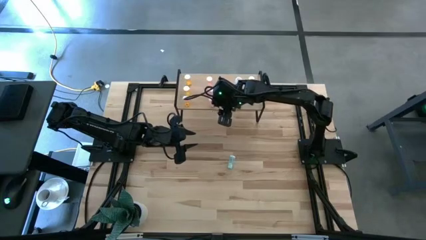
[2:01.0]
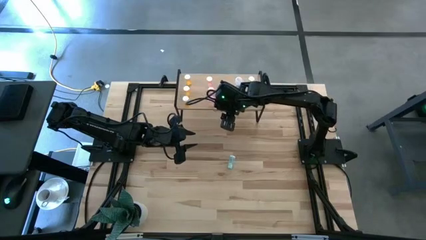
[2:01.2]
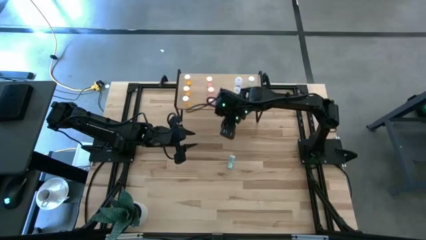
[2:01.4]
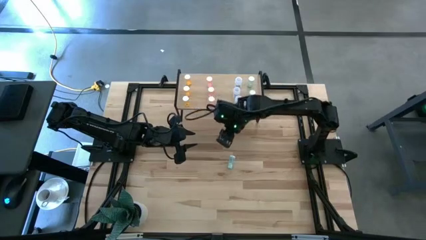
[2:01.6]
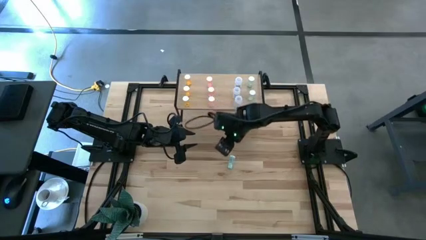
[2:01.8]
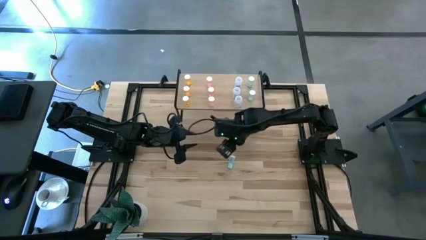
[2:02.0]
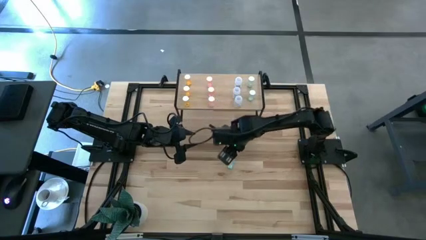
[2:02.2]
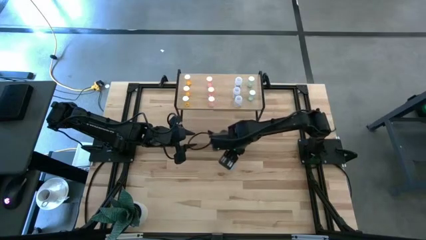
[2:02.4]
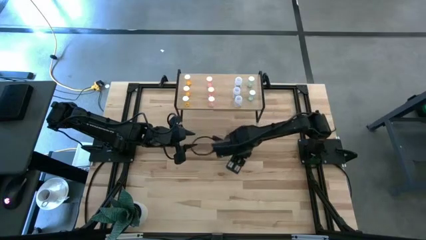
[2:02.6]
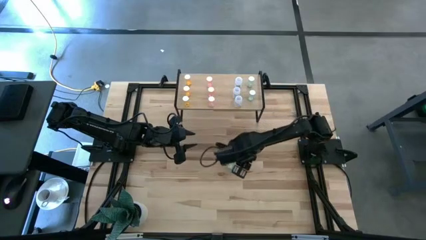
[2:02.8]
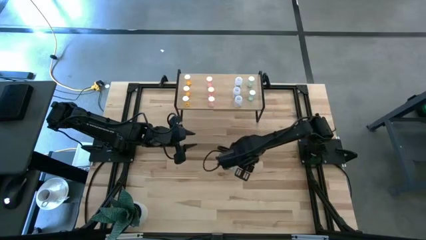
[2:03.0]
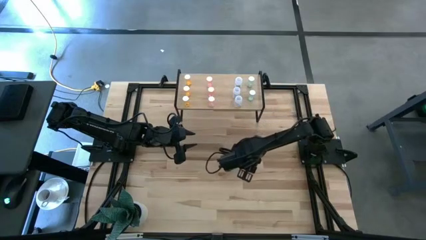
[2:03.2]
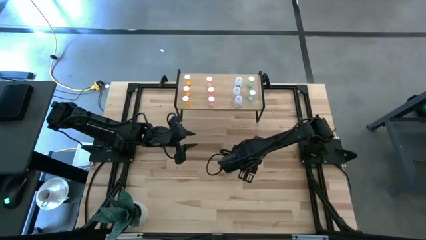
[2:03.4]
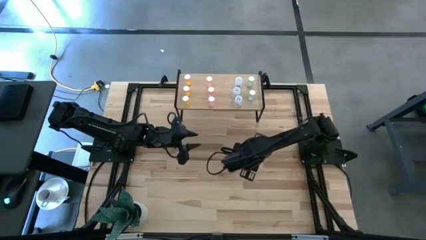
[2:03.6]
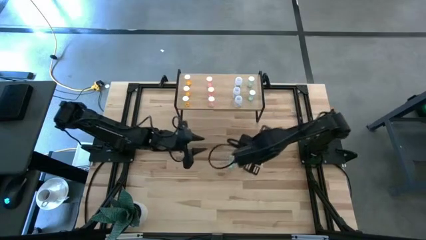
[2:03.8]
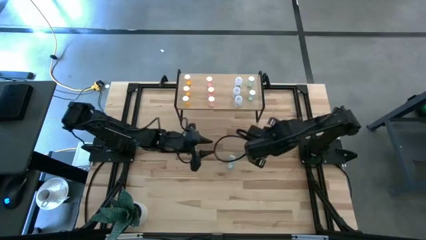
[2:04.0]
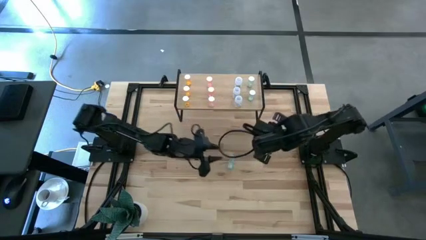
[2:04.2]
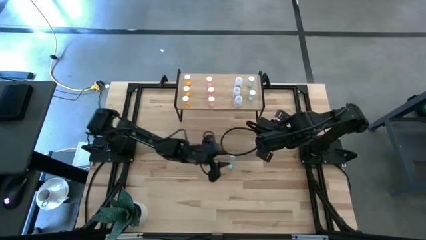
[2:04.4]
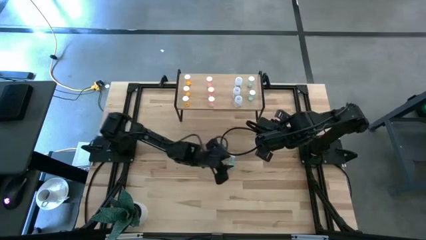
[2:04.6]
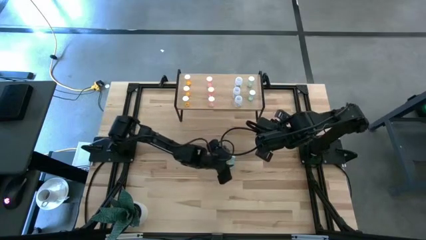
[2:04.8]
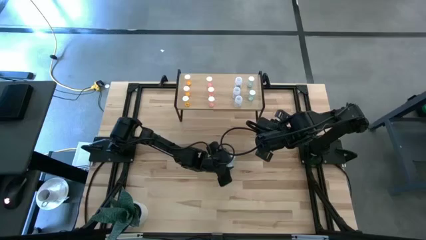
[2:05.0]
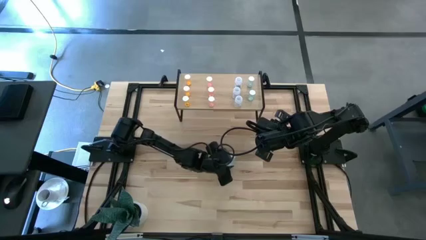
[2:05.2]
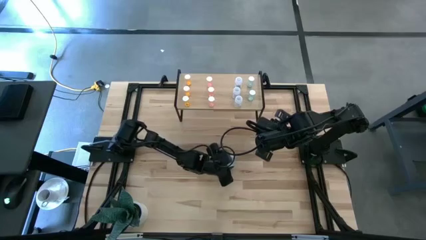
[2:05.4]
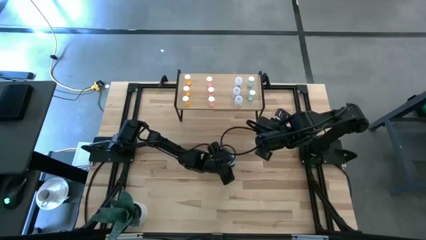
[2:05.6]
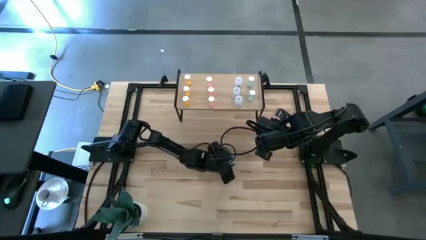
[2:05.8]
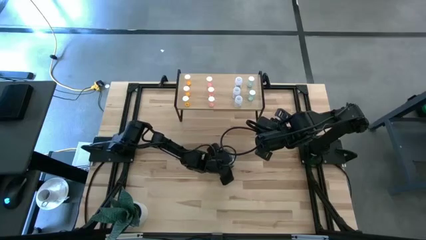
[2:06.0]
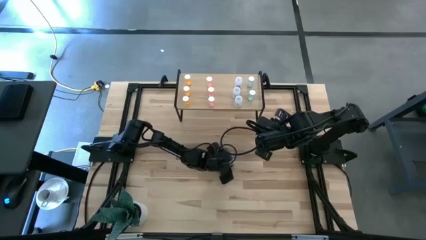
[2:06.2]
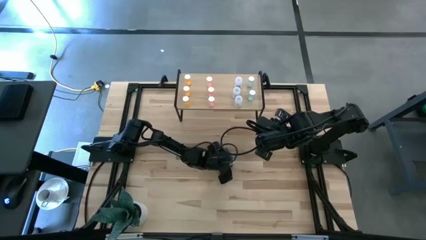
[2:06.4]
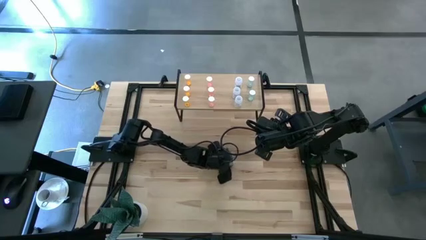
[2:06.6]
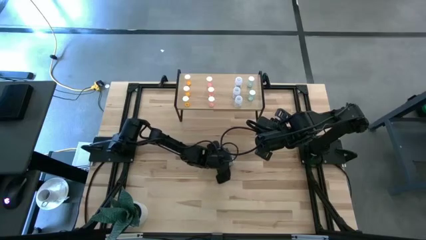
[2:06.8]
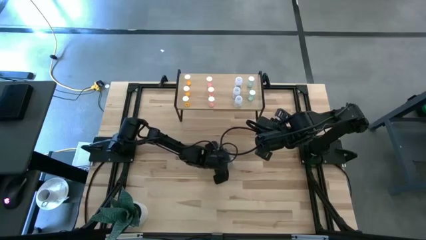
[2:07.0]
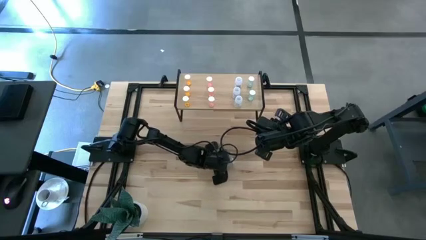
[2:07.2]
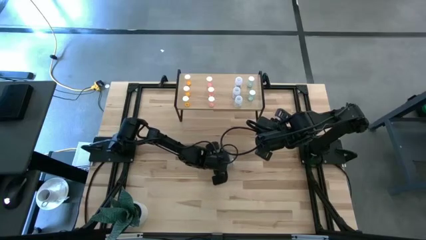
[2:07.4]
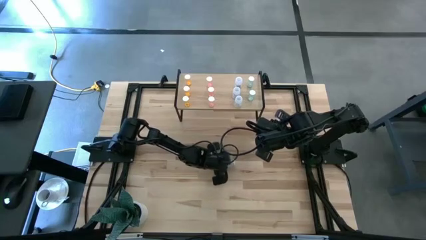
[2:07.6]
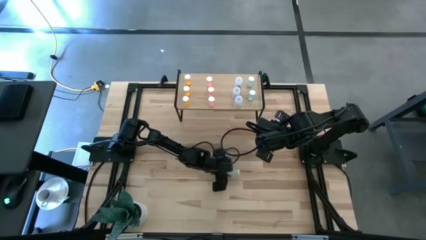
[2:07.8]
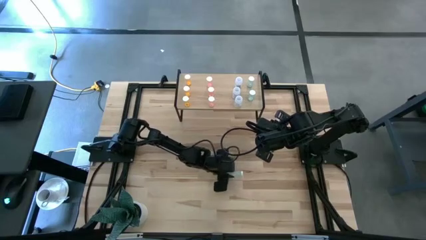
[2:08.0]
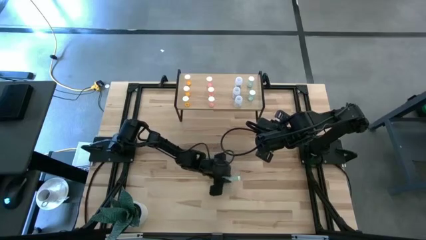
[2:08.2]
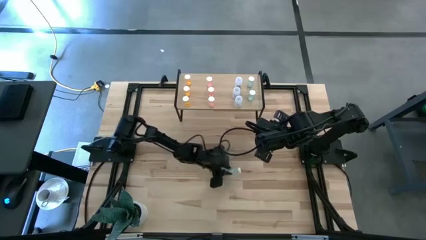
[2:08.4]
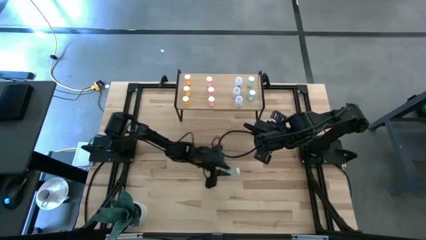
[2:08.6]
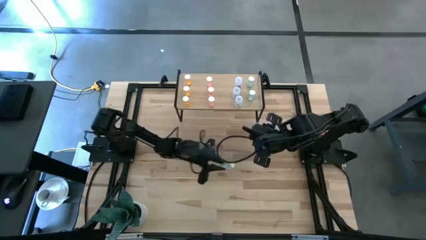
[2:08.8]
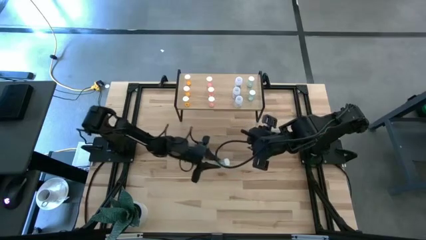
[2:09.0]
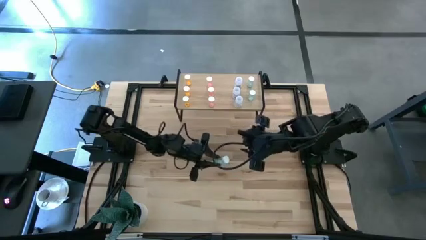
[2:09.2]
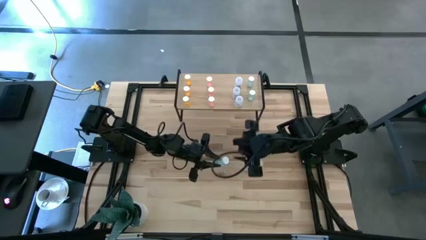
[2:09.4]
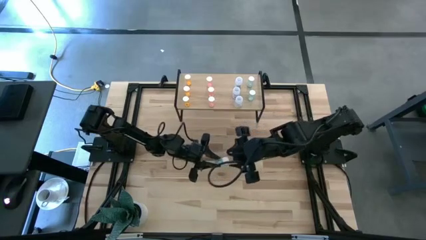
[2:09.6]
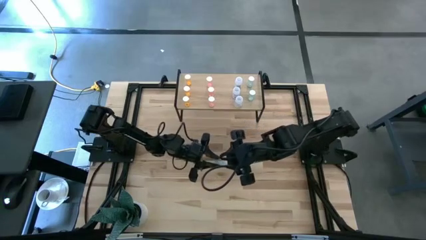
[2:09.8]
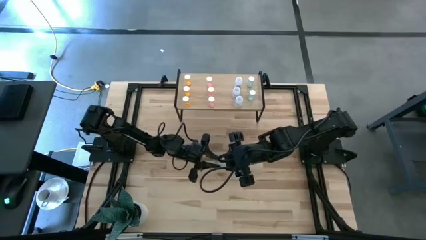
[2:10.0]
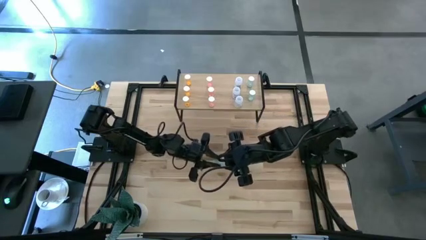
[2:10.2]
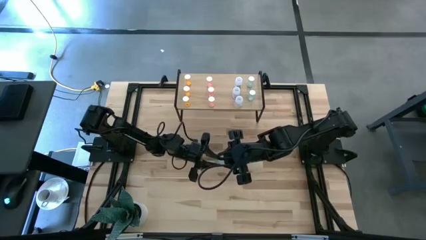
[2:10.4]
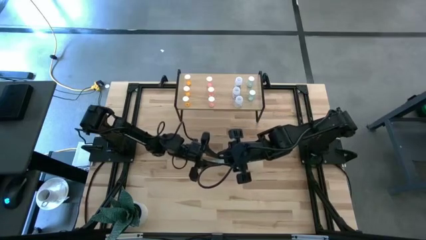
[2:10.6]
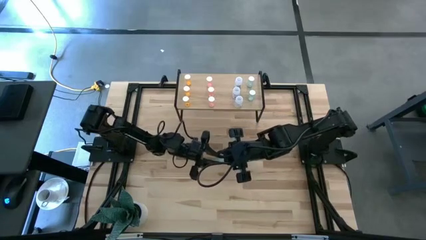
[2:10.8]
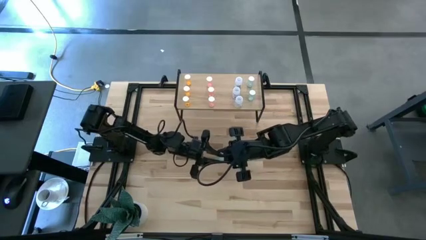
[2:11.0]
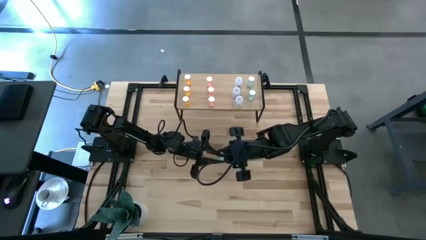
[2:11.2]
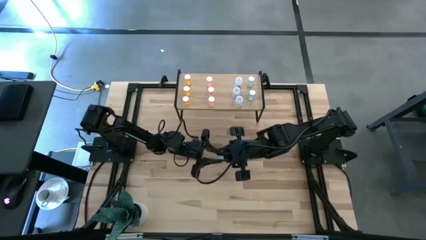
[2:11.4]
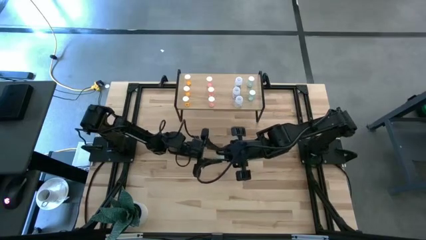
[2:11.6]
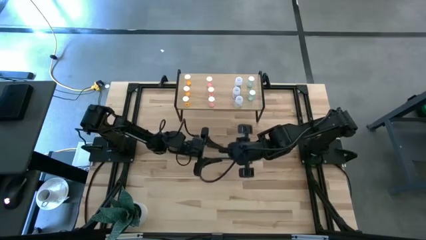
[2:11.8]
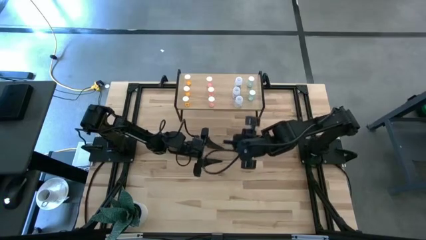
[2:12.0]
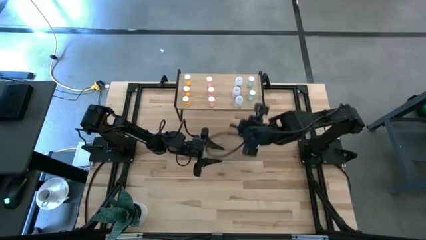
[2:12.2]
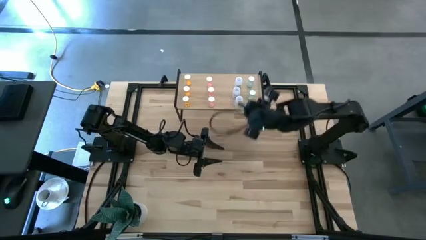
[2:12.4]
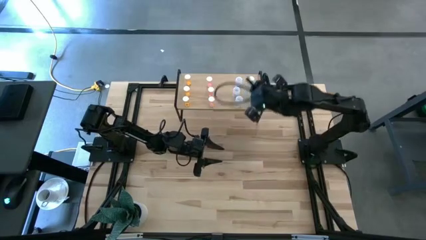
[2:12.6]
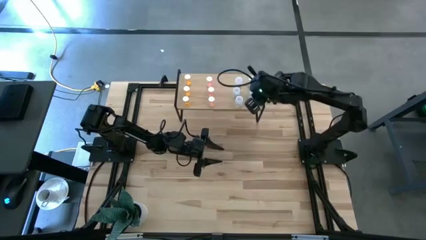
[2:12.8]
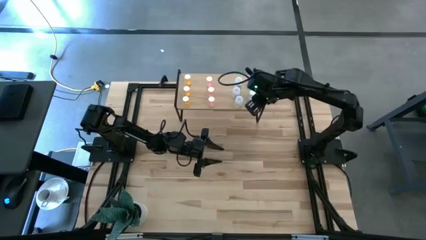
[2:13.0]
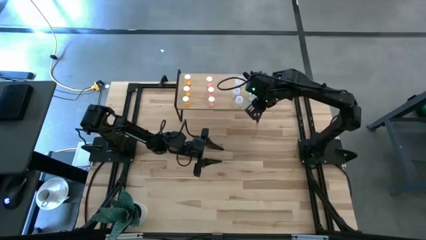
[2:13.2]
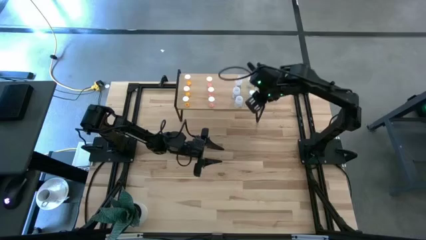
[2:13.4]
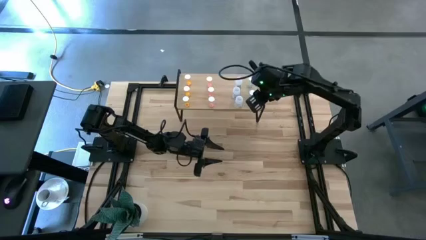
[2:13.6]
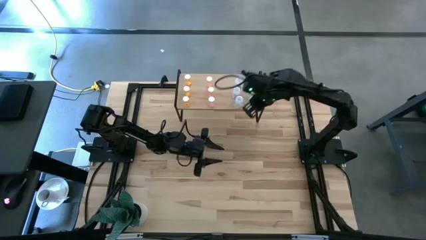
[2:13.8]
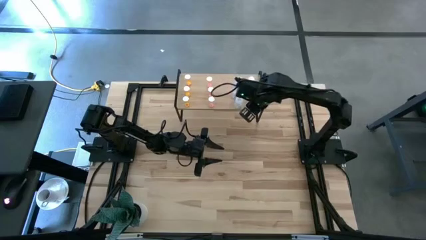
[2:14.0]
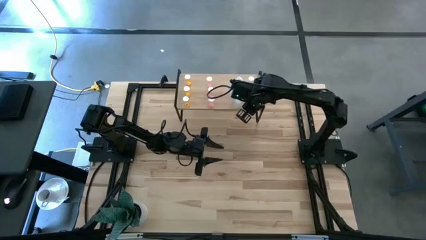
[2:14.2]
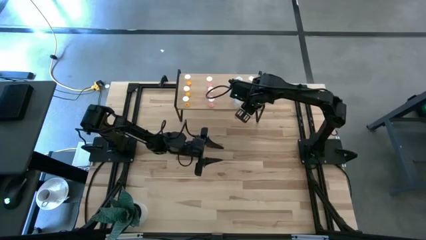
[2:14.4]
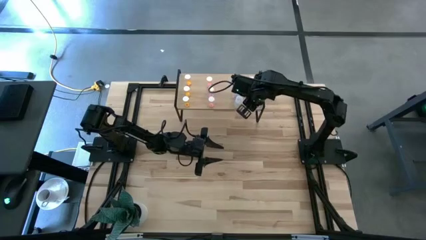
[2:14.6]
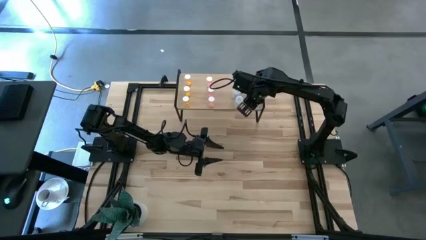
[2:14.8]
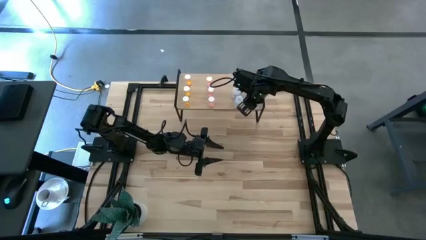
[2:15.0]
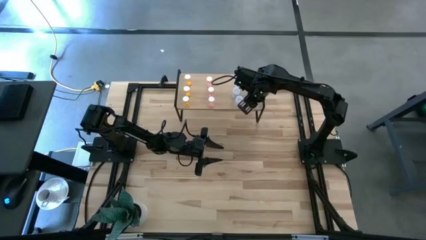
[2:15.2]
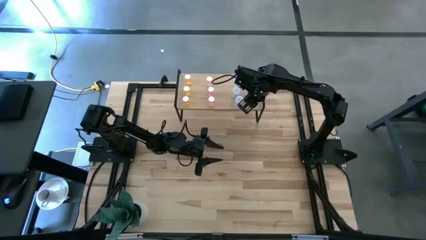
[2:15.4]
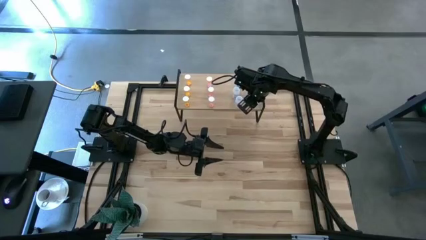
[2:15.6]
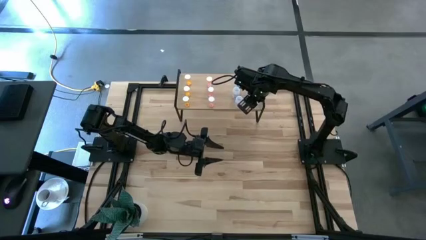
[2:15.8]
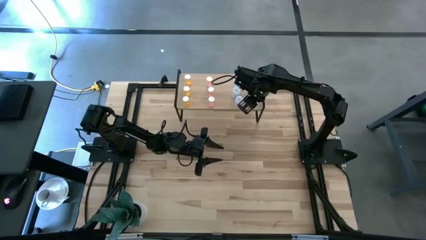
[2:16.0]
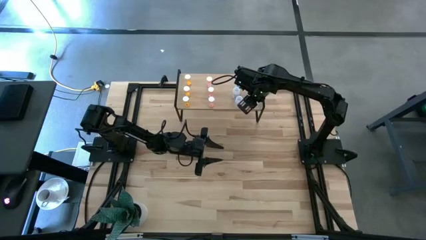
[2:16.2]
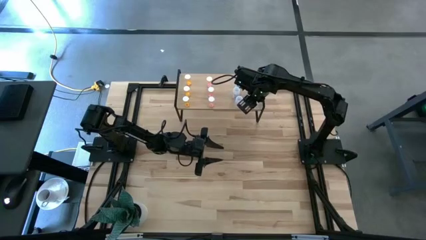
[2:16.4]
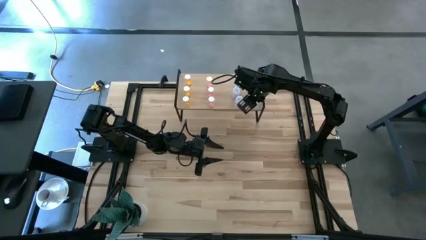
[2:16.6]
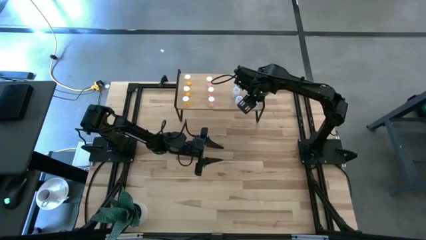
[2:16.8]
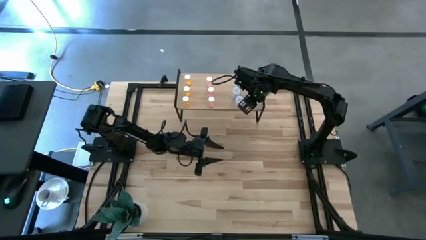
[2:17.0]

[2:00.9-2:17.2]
Task: Pick and place medicine bottles onto shelf by color
Align the blue pill bottle with the other blue pill bottles on the shelf
